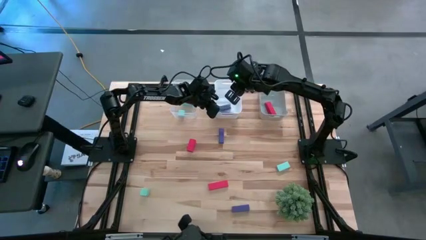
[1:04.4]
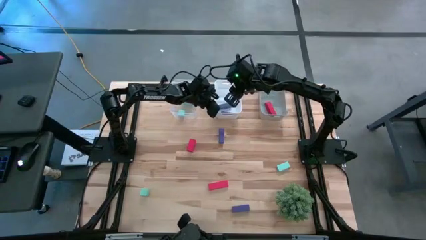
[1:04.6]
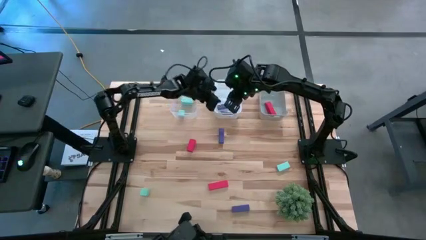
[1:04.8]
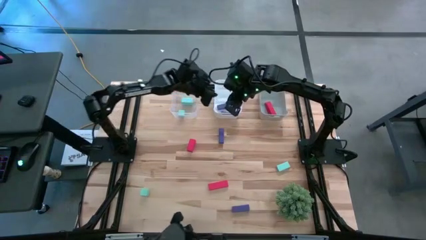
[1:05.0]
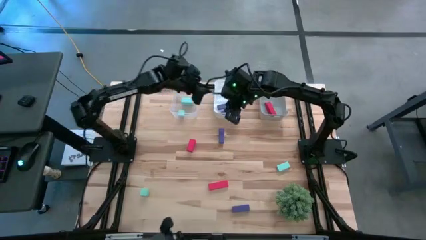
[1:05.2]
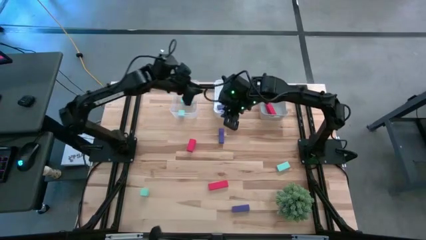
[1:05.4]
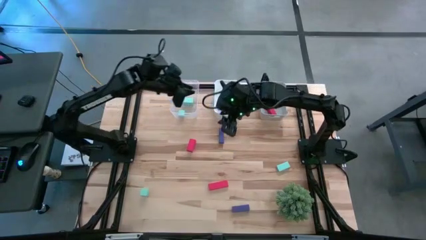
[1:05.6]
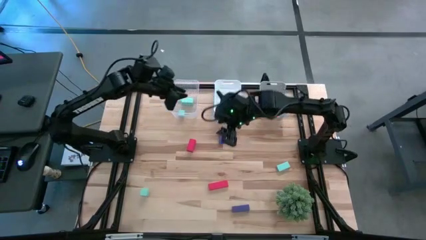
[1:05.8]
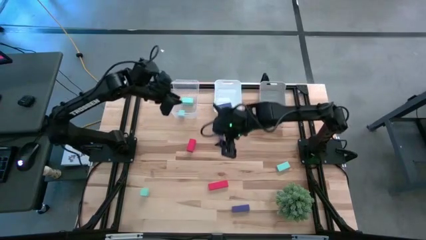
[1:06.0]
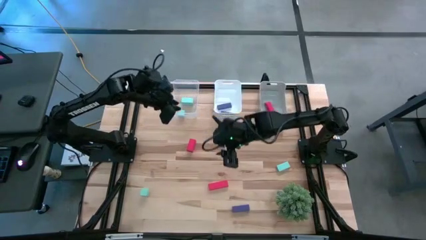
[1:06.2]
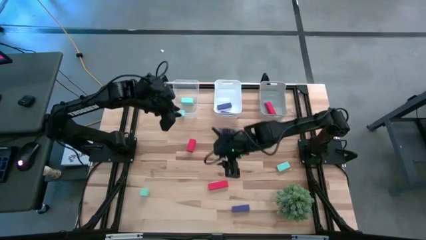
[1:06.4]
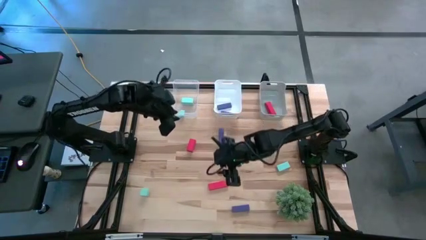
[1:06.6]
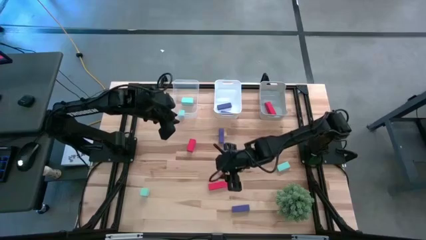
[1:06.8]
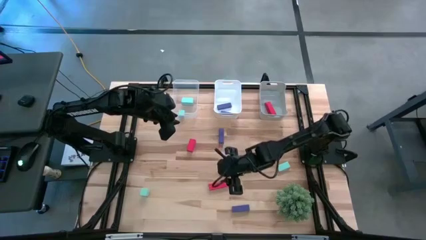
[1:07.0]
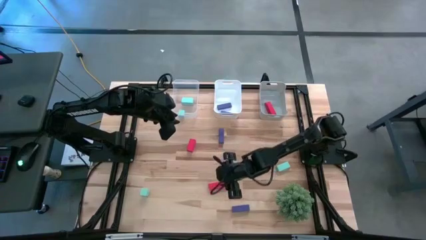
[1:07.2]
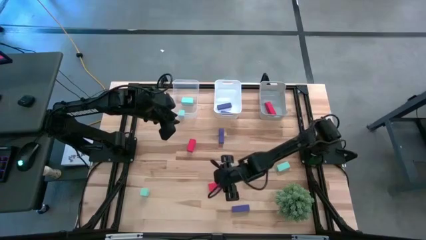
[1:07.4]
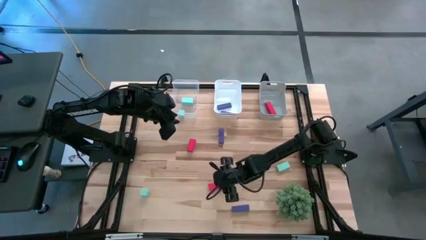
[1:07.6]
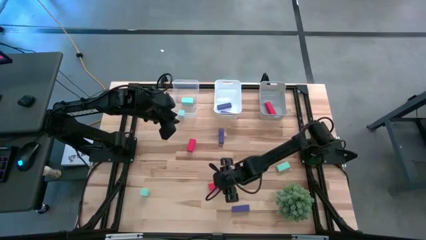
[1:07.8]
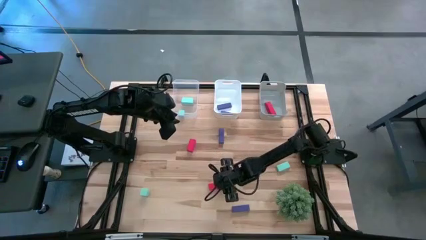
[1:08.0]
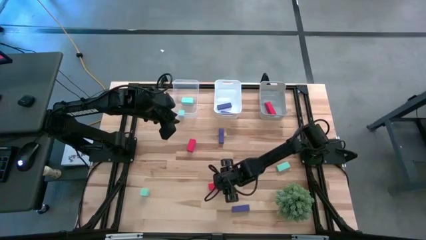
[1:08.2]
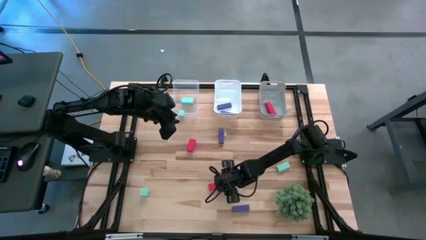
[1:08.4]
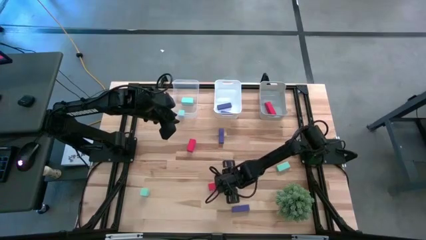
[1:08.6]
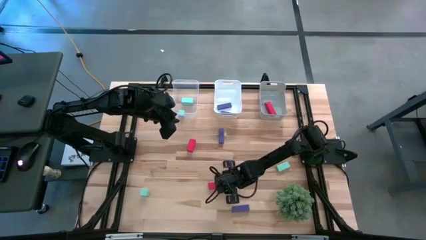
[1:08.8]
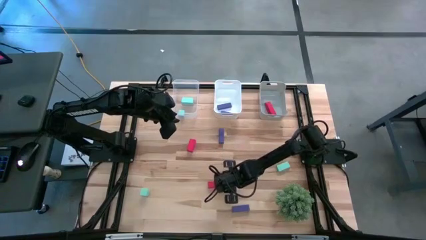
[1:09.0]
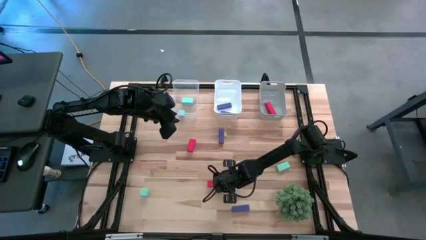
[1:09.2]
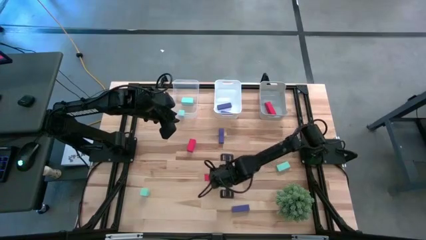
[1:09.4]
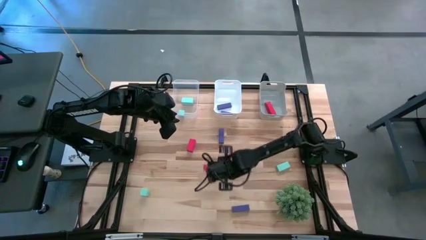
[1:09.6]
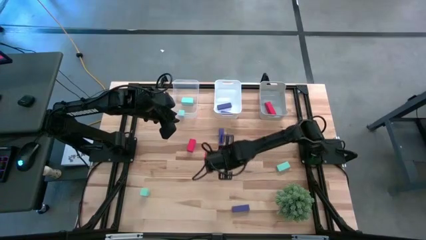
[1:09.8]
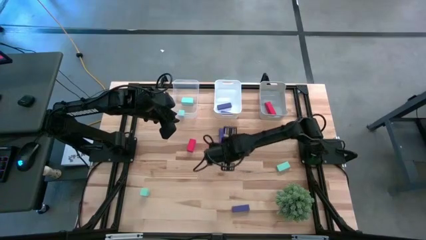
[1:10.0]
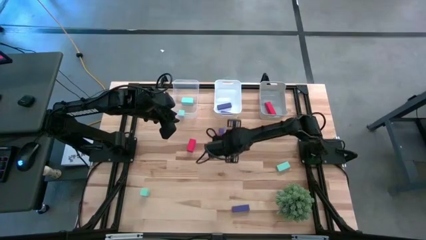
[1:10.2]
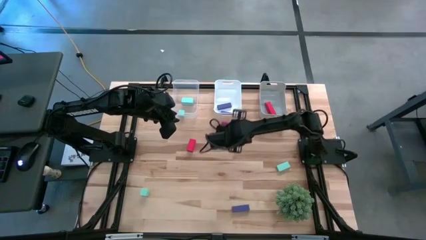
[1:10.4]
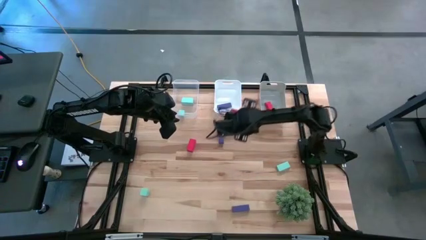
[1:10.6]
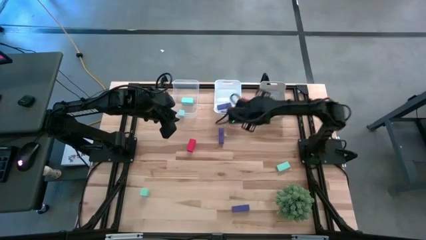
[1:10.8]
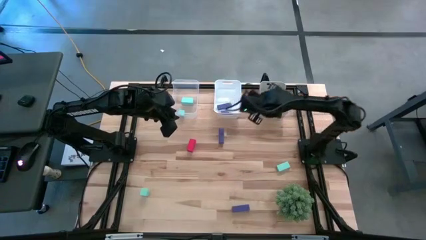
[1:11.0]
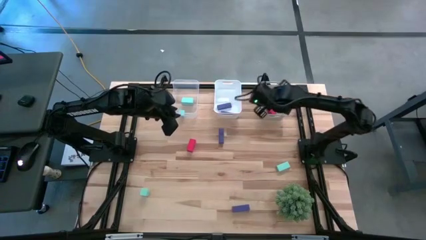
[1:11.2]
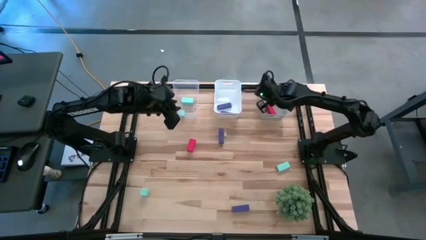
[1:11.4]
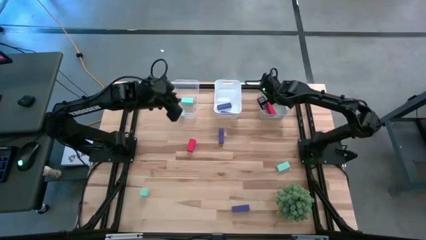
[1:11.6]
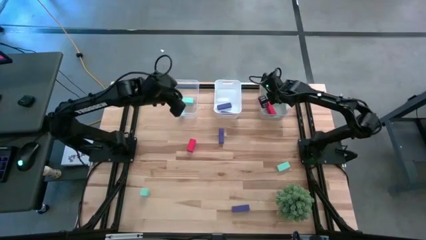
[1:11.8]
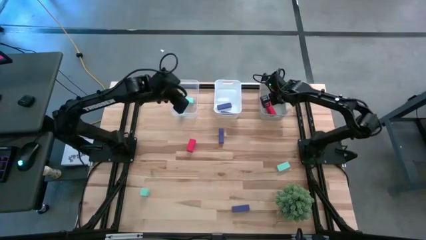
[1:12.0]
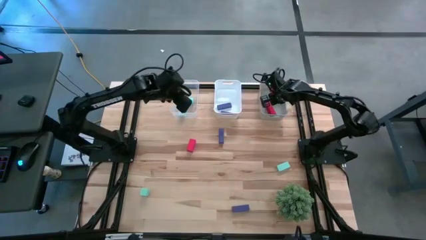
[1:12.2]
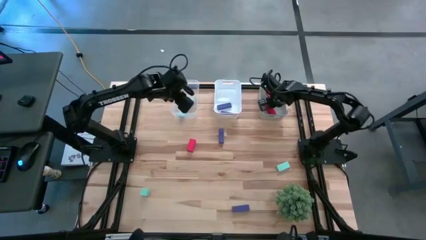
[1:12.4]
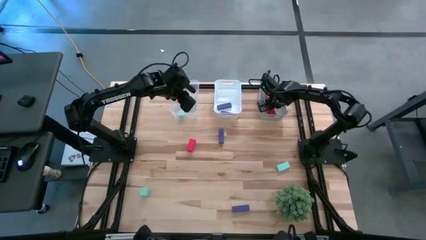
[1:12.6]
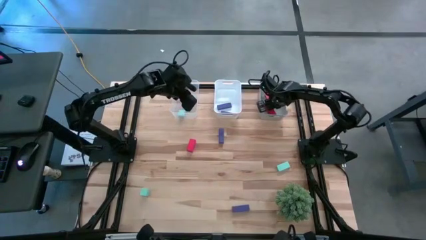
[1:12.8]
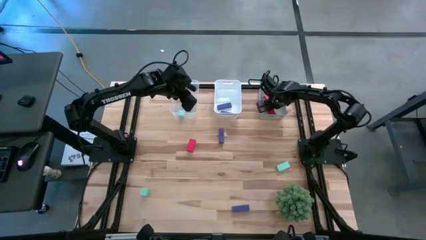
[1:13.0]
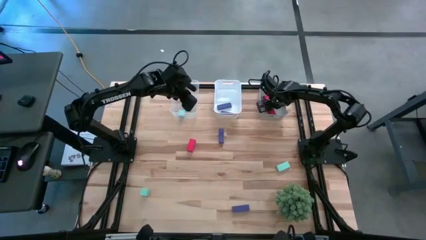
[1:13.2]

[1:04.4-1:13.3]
Task: Sort & place blocks by color
Put the red block into the gray bin

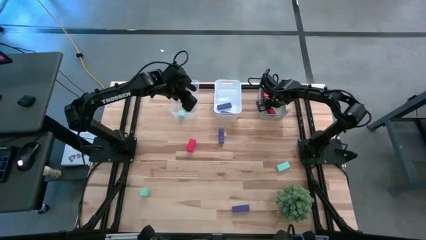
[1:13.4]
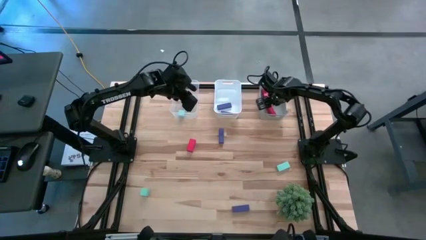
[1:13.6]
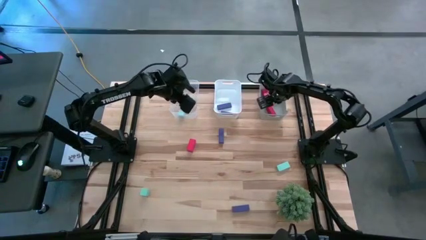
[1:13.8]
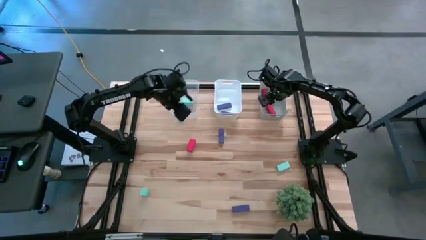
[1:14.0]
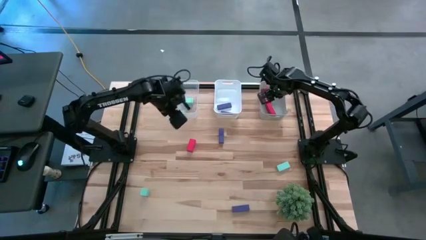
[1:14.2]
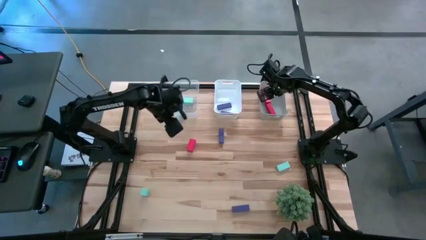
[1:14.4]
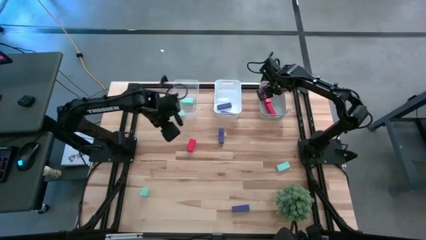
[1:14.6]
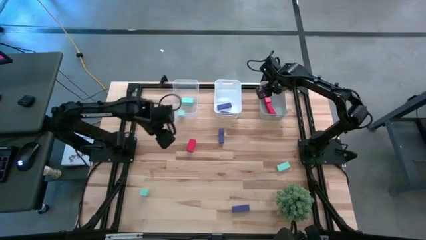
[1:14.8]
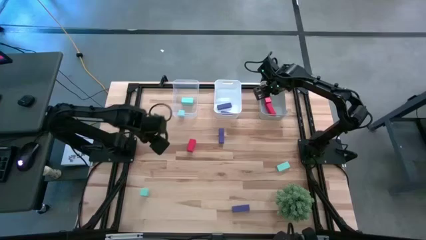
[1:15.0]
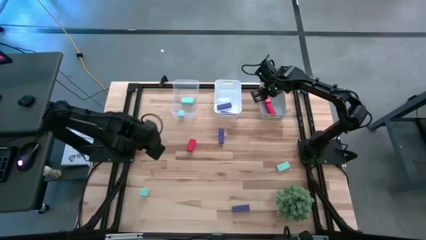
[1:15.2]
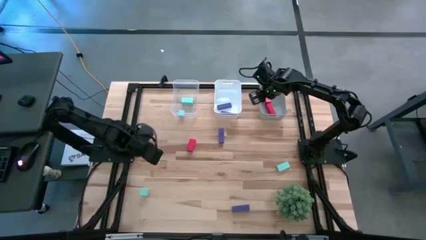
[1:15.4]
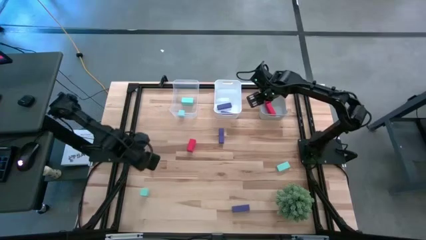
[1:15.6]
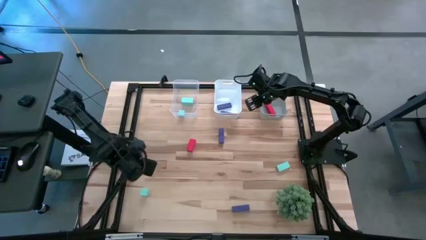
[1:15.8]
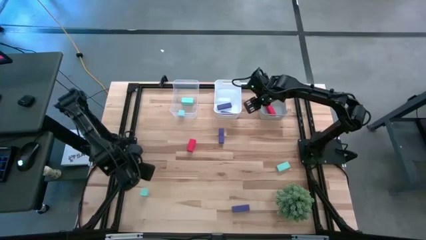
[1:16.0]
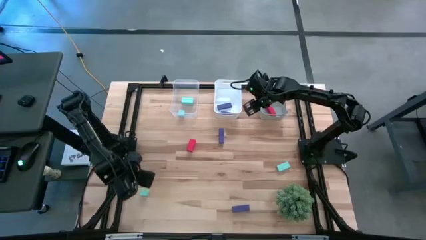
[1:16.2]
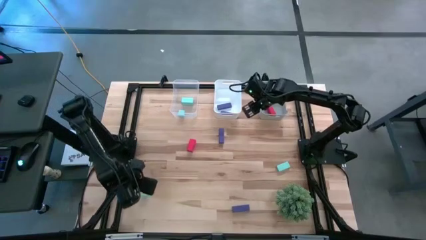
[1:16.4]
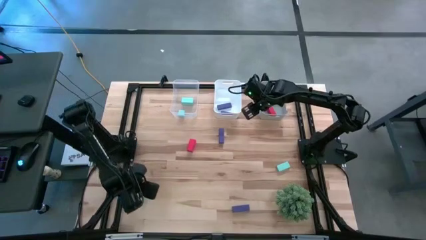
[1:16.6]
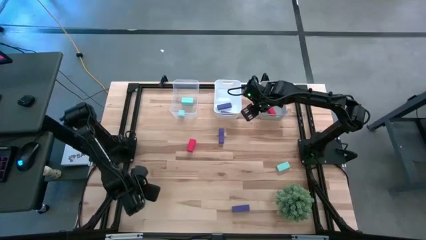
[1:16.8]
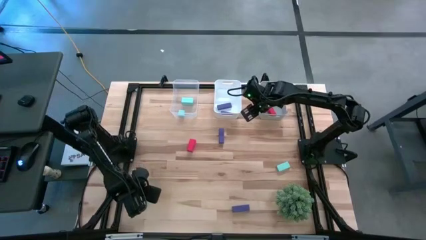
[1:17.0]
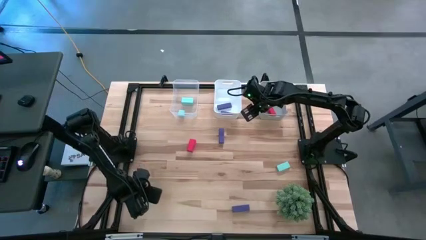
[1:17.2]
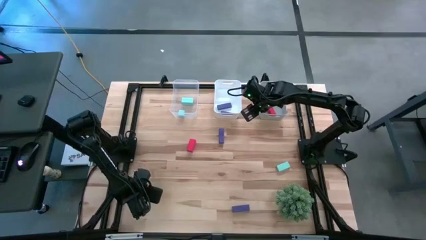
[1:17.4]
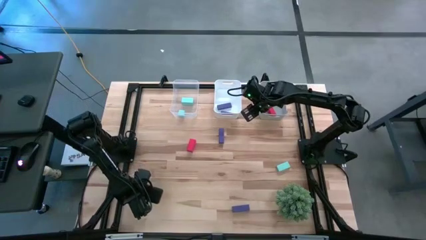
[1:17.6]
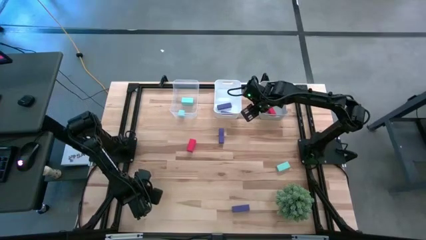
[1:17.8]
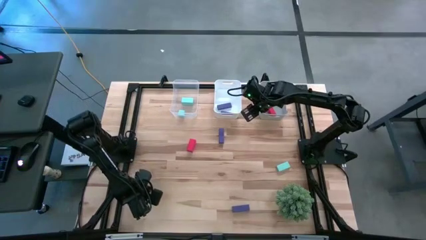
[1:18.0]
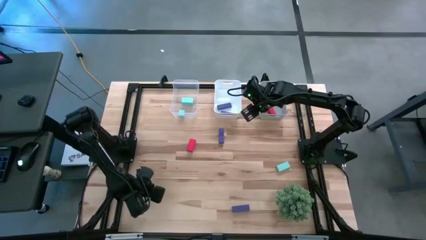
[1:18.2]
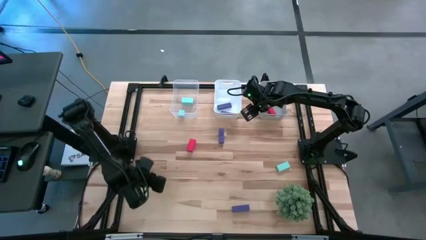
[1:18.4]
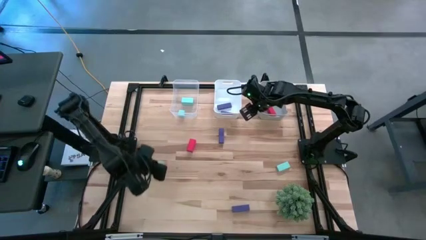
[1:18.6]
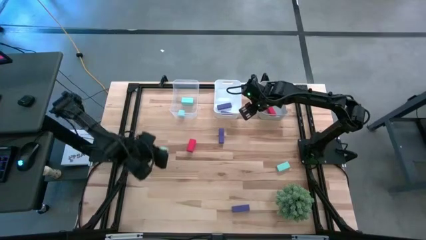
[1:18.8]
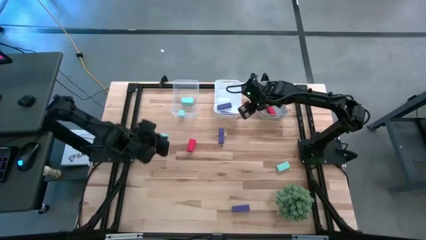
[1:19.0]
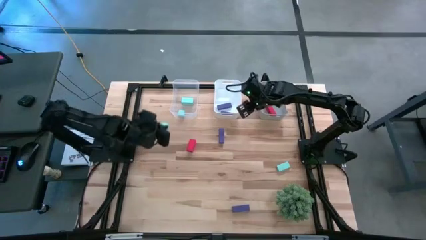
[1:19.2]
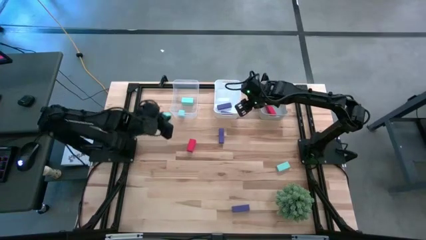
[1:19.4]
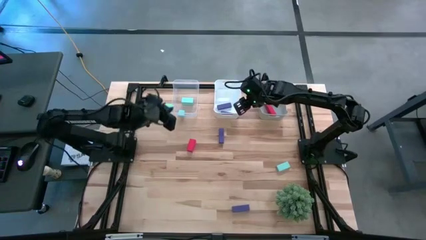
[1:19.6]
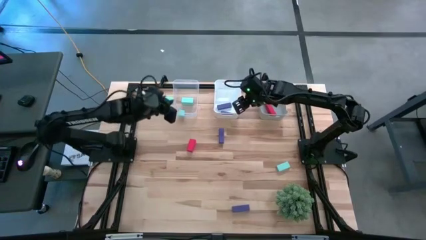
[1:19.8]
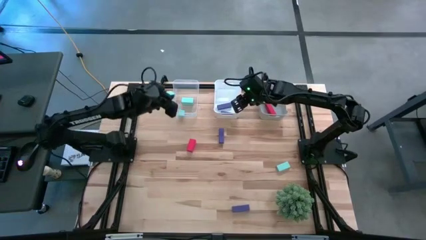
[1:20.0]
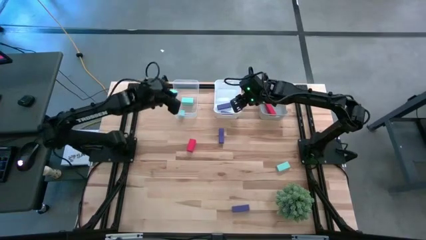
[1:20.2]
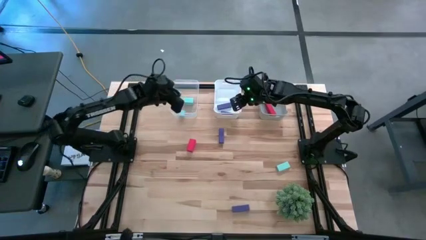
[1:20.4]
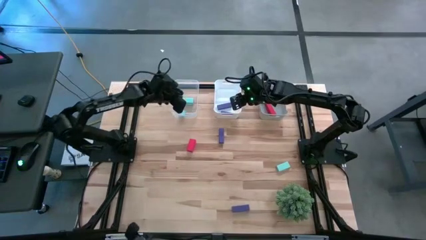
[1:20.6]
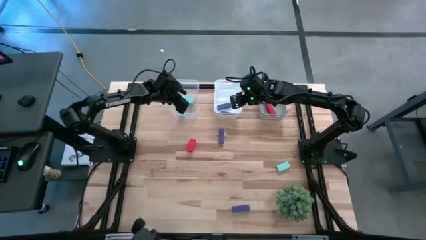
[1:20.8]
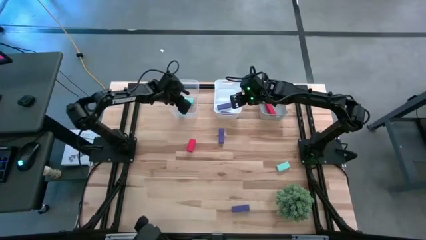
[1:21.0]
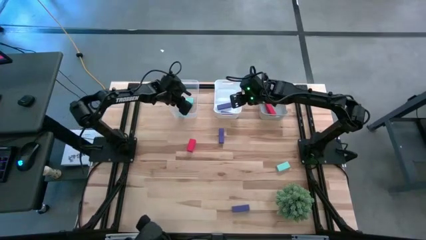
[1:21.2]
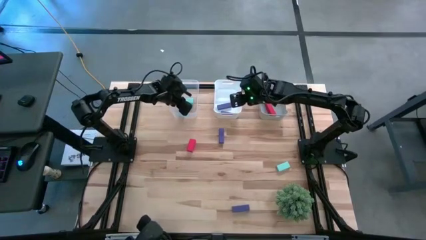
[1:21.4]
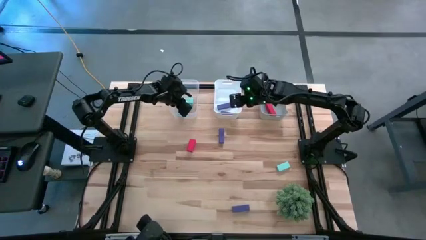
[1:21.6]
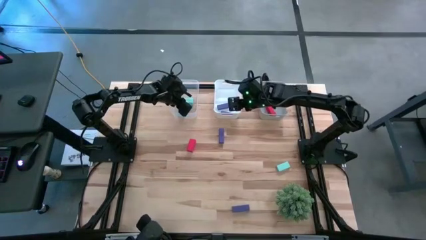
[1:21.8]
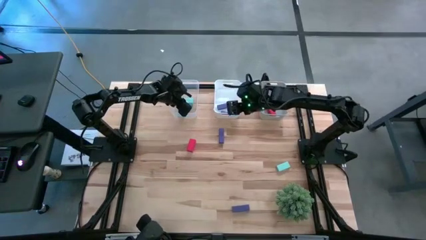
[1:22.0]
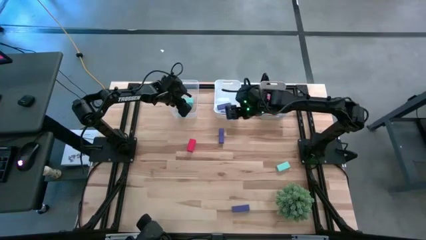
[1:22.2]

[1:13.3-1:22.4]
Put the blue block into the transparent bin
